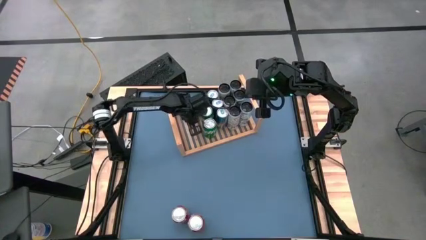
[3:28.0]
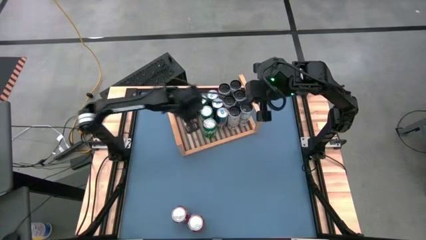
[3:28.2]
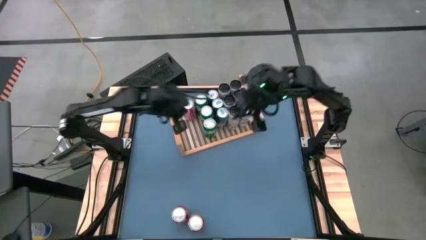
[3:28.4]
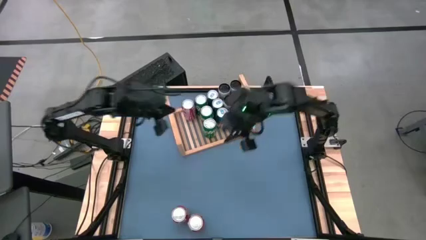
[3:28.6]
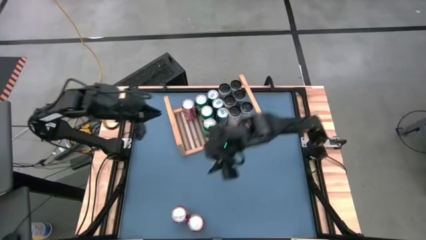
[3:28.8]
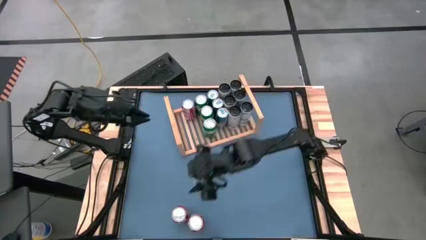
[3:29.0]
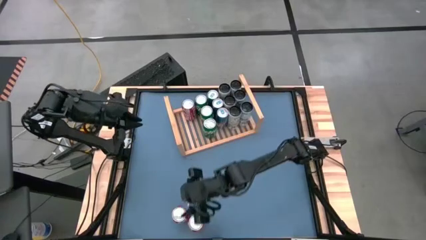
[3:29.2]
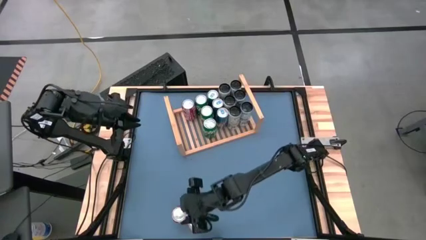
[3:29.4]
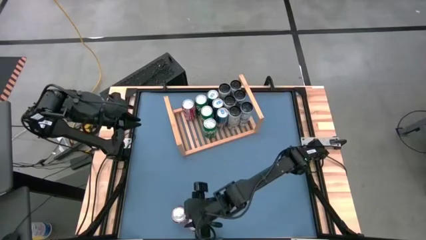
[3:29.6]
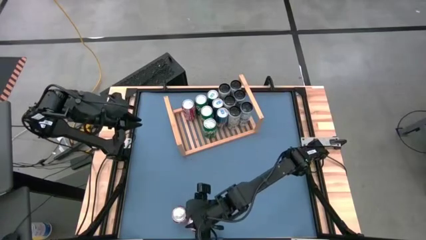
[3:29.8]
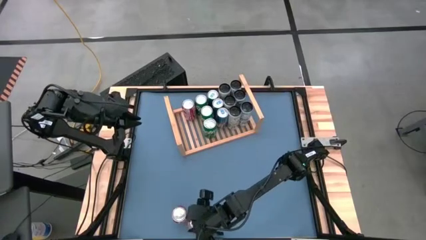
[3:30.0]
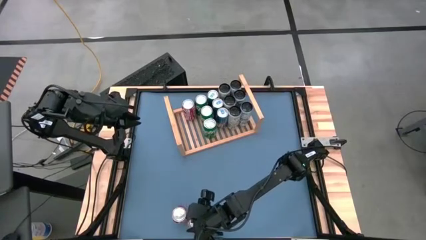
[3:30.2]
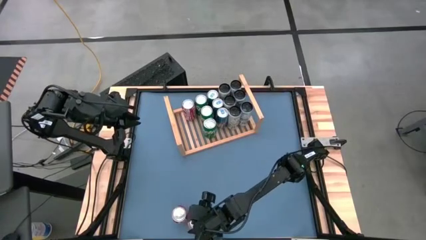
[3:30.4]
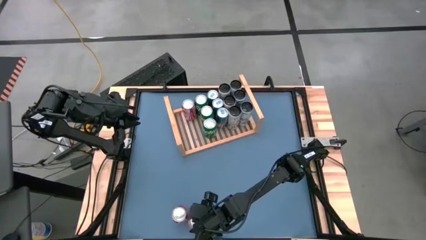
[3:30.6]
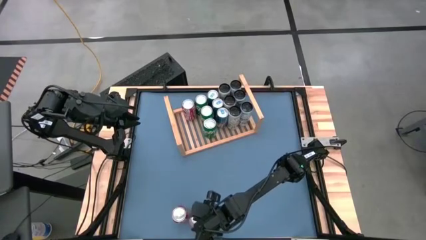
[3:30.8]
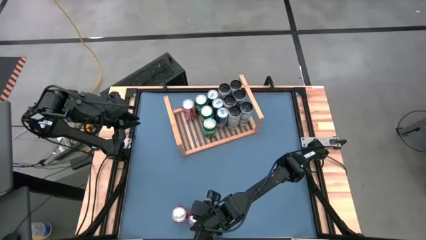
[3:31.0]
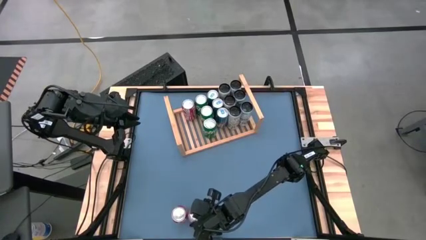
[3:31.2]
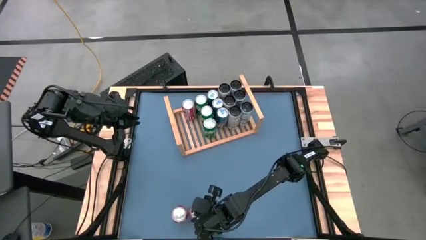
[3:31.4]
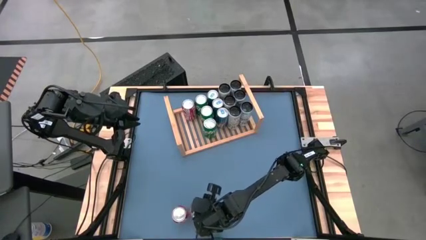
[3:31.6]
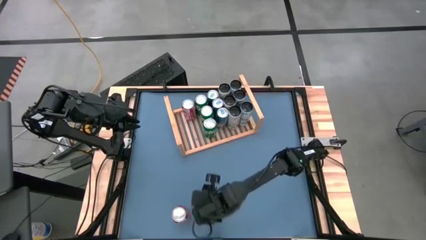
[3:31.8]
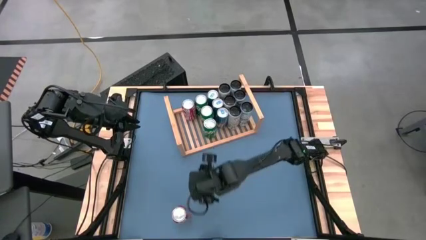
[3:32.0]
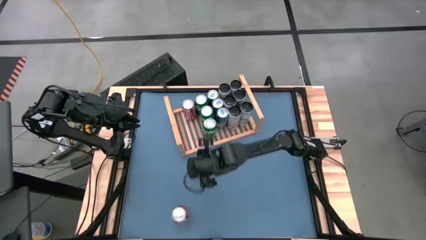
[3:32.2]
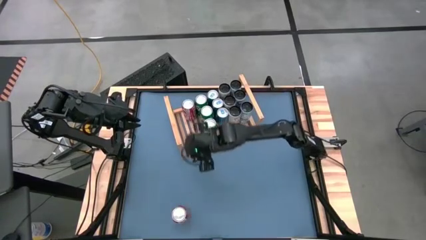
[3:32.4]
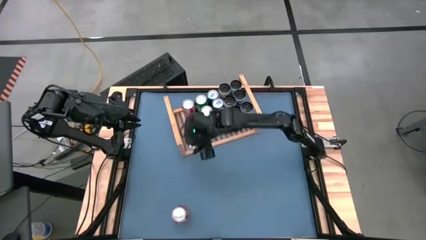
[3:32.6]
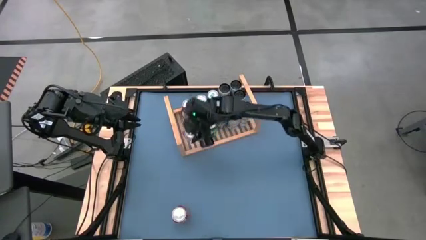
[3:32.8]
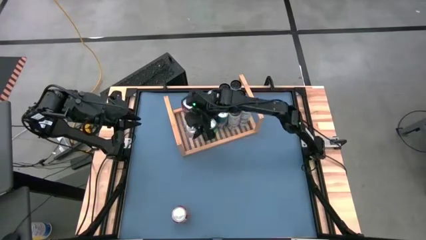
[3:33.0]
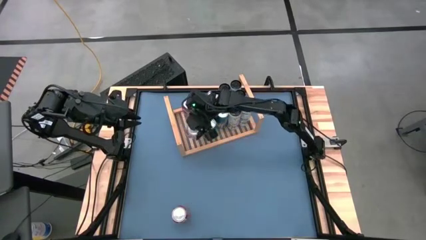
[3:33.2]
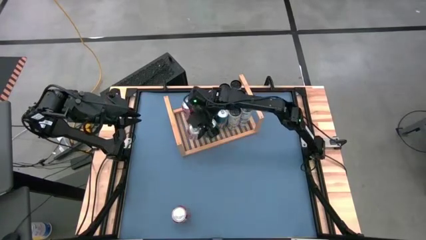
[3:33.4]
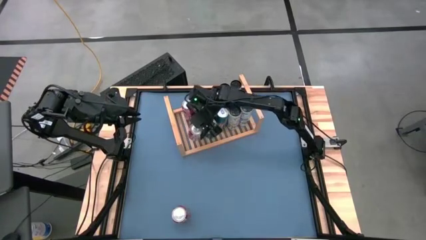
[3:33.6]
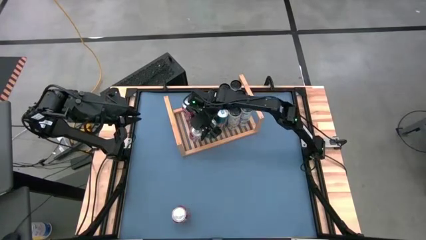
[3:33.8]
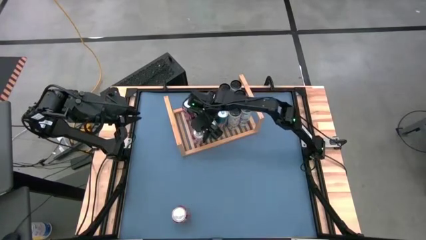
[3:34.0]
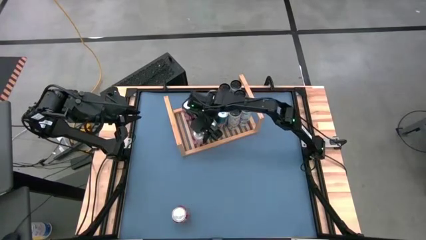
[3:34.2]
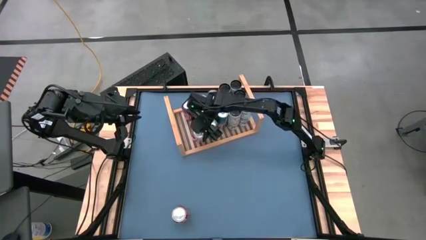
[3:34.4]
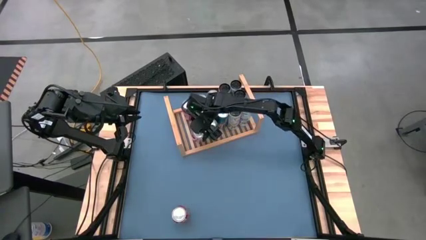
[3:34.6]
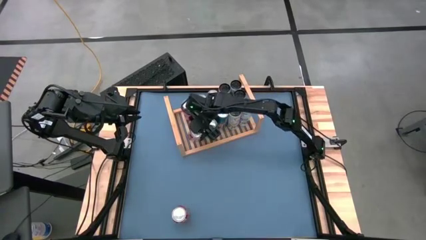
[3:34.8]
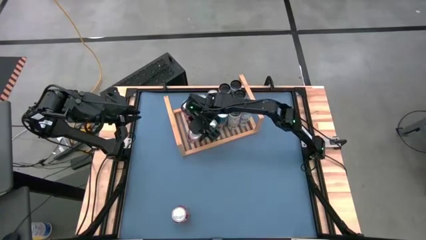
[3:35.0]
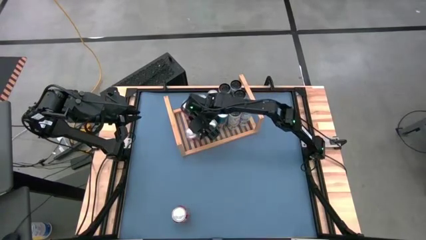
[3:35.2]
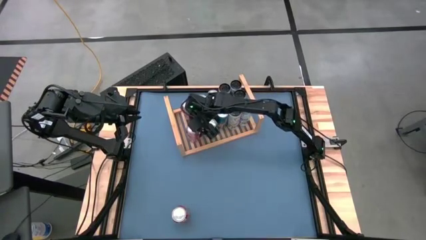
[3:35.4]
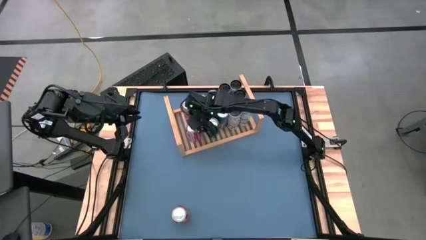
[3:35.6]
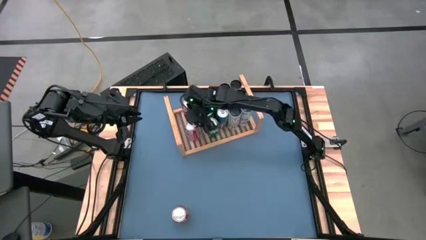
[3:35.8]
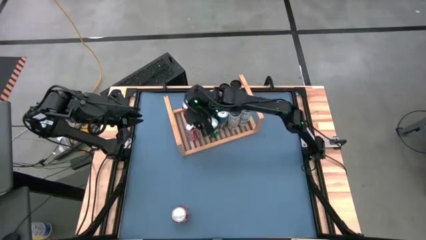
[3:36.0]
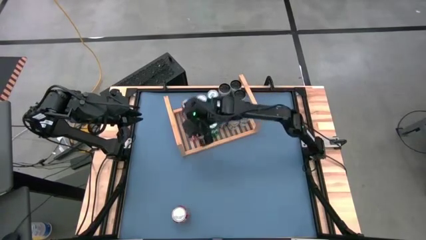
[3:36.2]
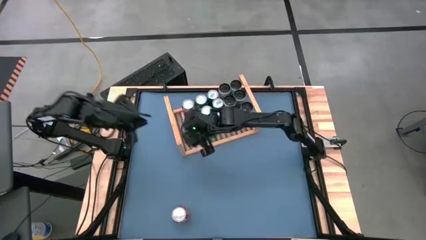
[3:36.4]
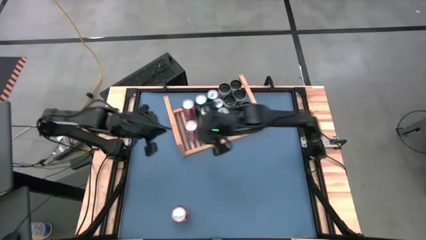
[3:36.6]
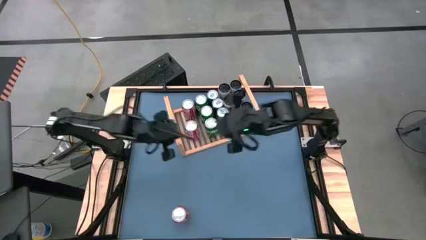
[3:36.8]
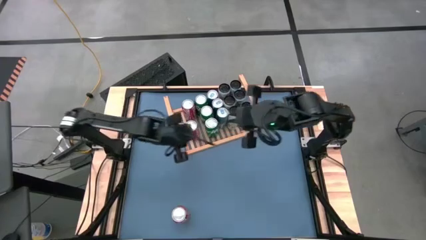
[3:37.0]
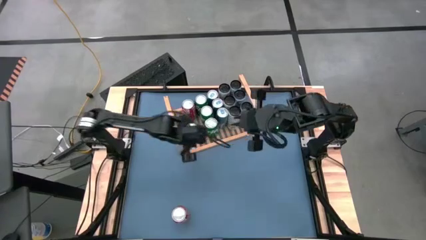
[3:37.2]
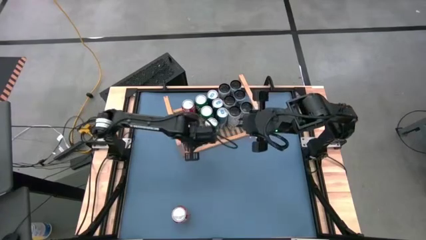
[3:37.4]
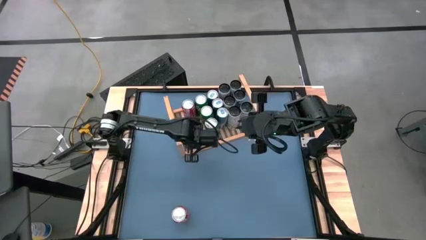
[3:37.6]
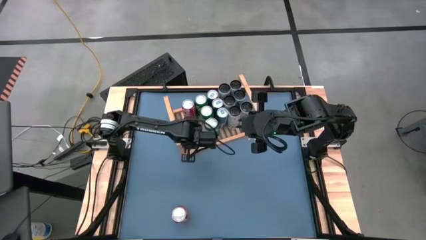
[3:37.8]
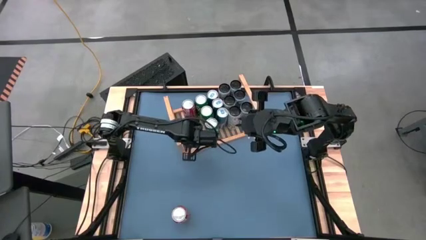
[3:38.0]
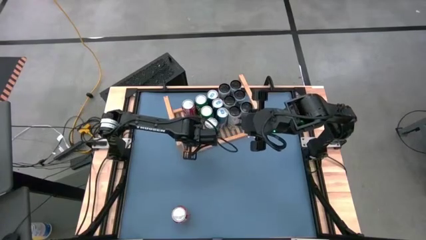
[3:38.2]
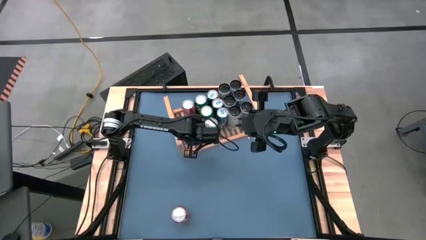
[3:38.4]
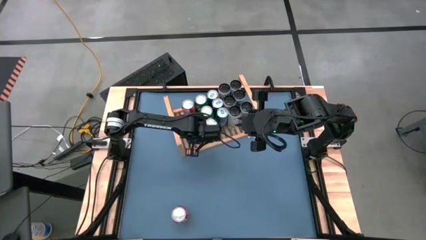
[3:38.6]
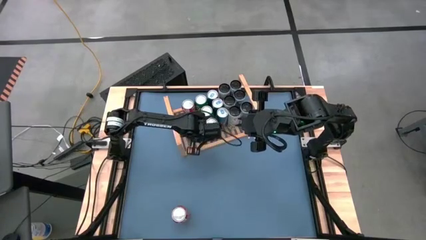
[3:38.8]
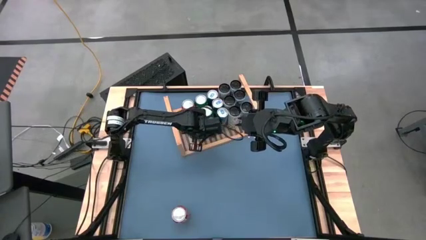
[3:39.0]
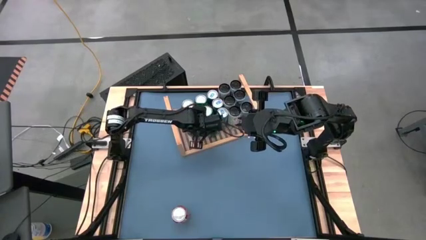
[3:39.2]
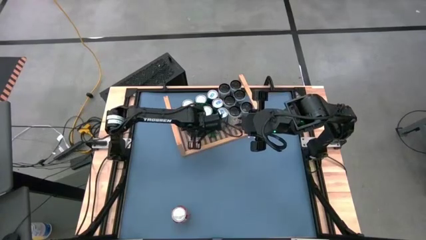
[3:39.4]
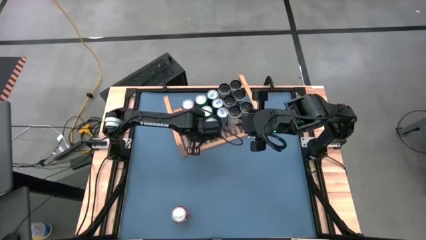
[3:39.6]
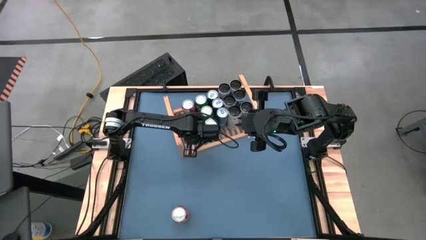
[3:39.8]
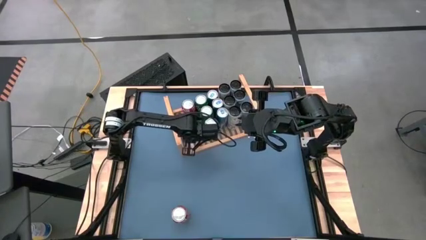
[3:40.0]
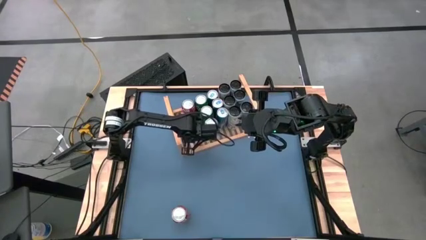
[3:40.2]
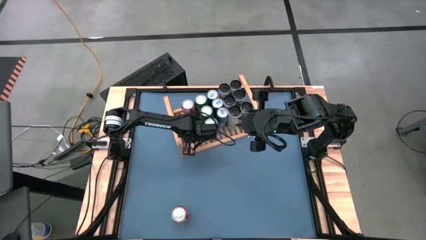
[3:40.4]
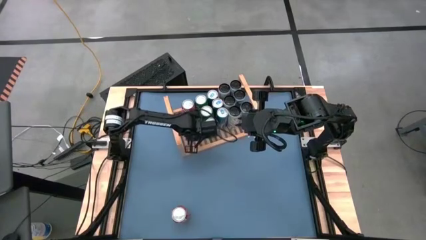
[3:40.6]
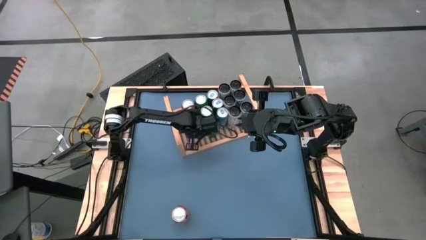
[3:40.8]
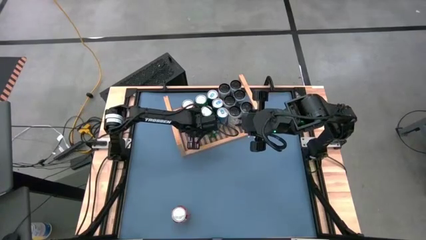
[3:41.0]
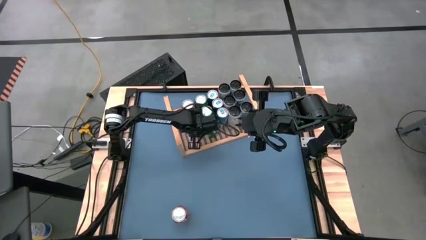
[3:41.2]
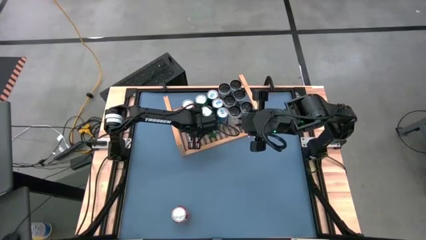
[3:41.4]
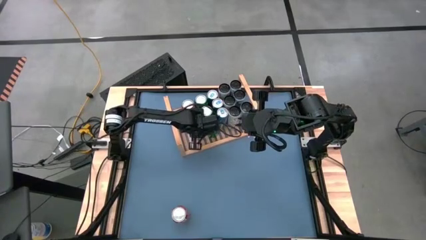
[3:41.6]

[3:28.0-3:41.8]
Task: Place canned beverage on shelf
Put the red-white soda can on the shelf aligned with the other red-white soda can

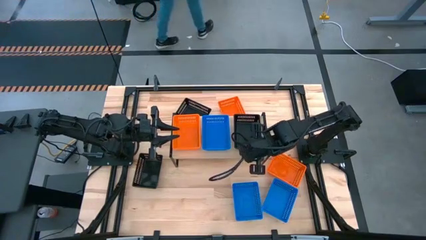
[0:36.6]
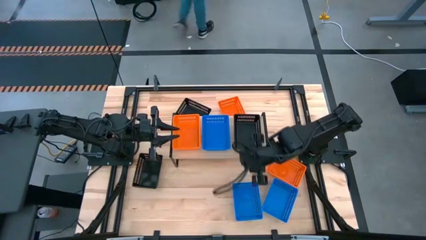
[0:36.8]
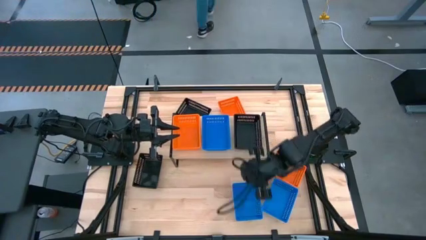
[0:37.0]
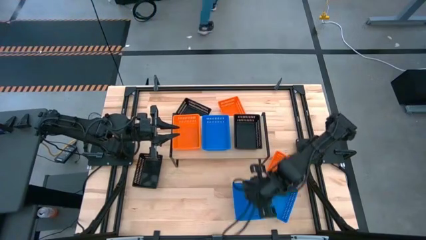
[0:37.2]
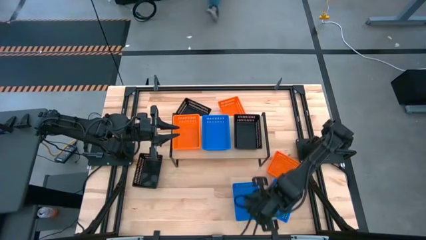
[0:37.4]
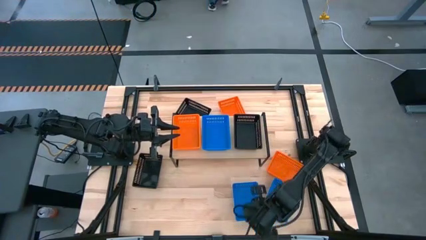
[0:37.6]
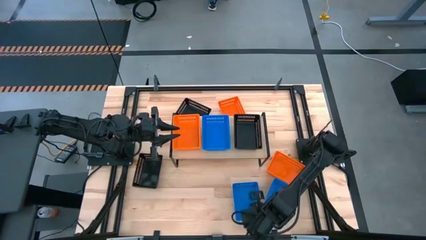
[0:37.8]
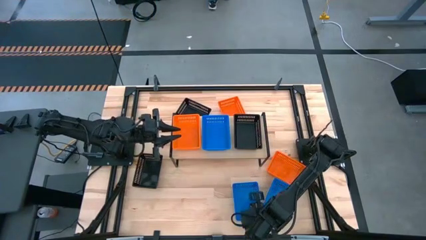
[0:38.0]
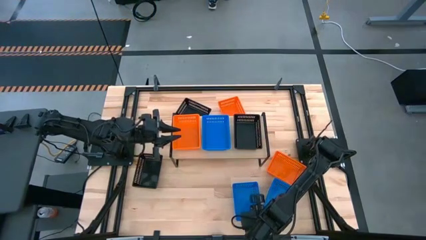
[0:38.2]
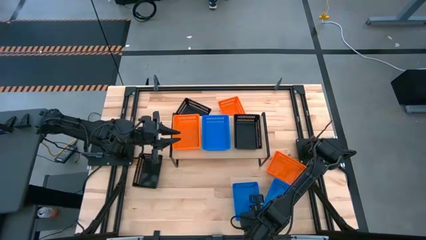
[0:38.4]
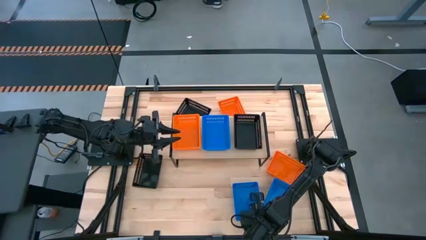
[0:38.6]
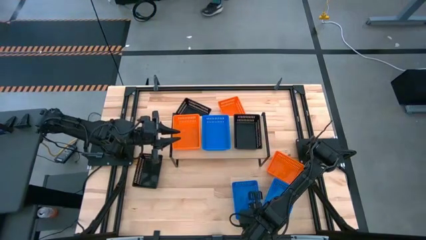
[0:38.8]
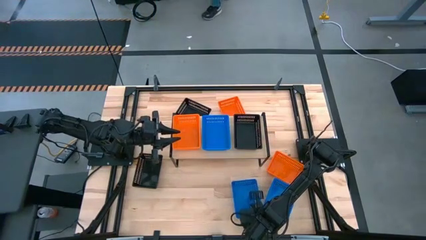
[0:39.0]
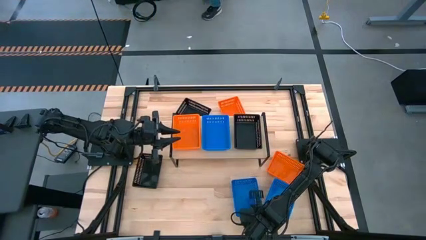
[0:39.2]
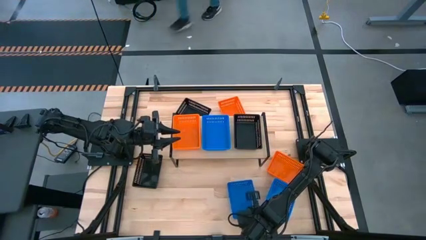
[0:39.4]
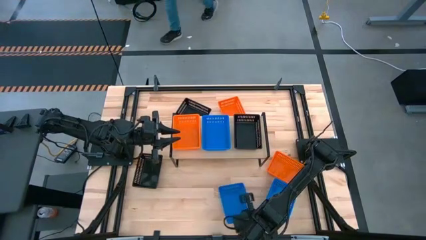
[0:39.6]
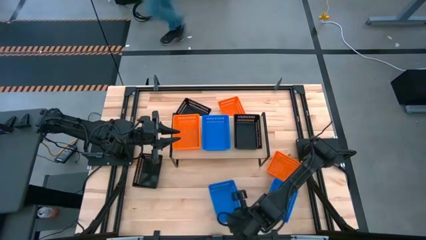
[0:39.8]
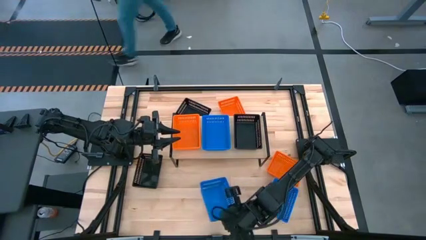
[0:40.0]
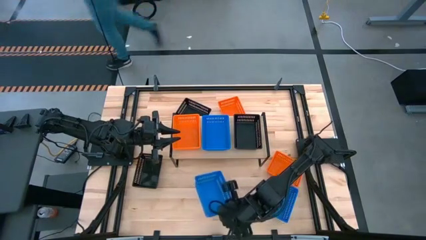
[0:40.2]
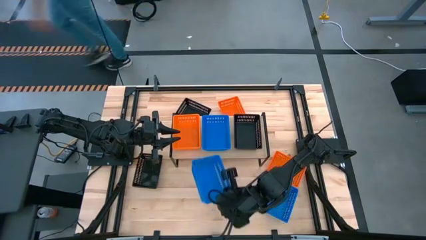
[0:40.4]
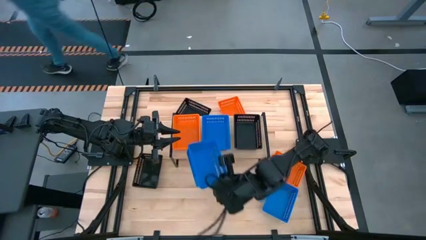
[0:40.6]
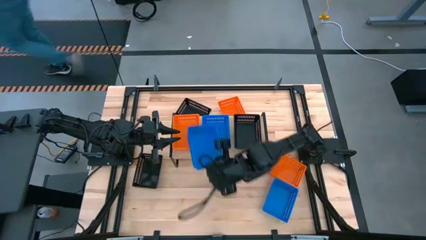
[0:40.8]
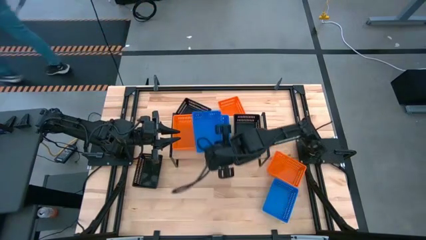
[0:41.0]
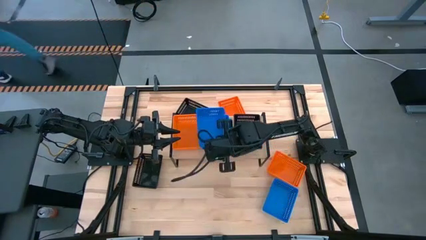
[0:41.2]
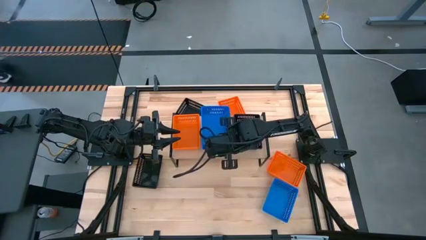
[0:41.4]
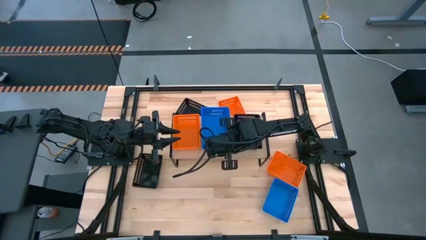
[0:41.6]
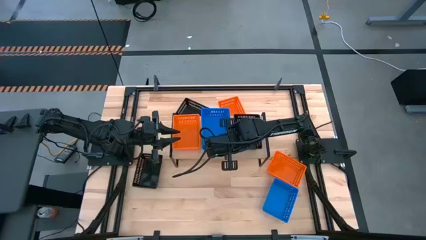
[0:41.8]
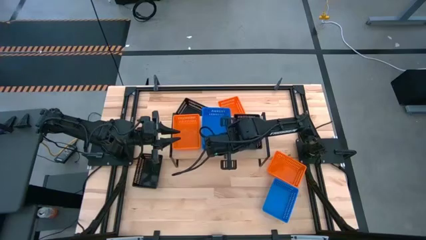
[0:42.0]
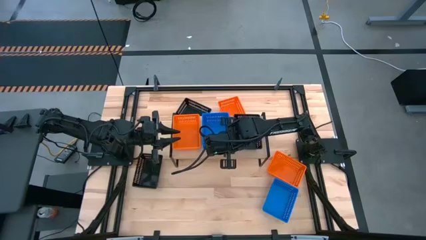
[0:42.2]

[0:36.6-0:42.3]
Task: Stack baskets on shelf by color
Stack the left blue bin on top of the blue bin on the shelf
